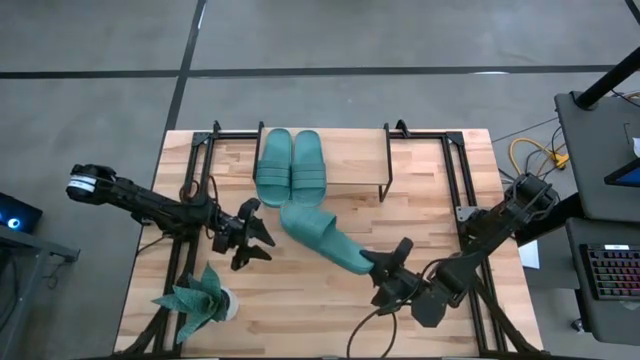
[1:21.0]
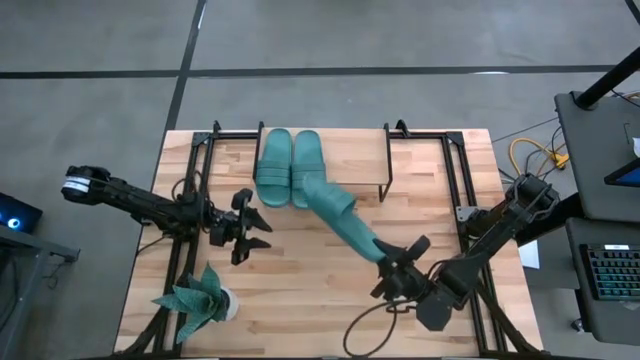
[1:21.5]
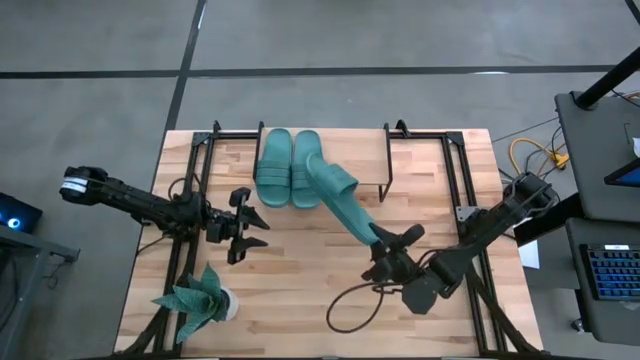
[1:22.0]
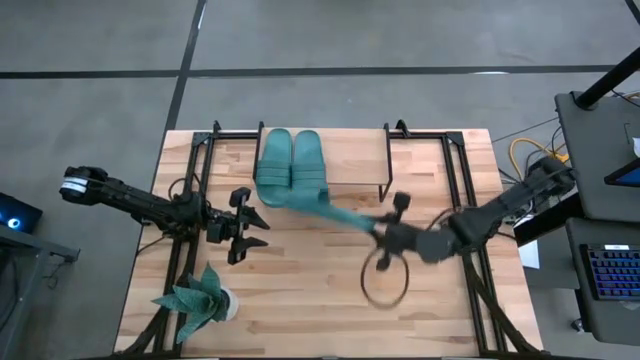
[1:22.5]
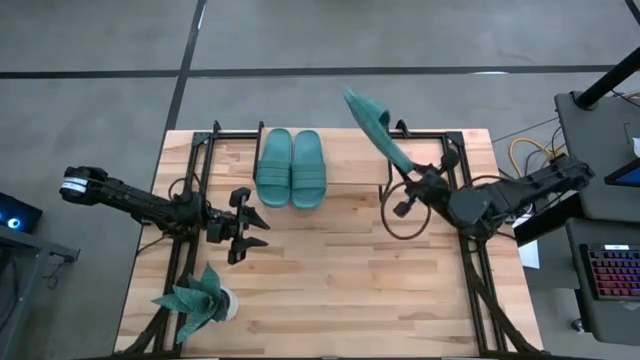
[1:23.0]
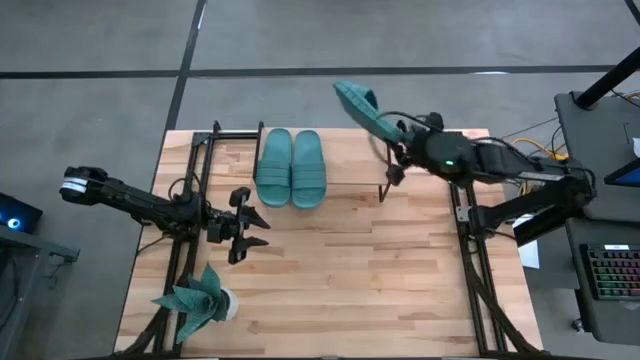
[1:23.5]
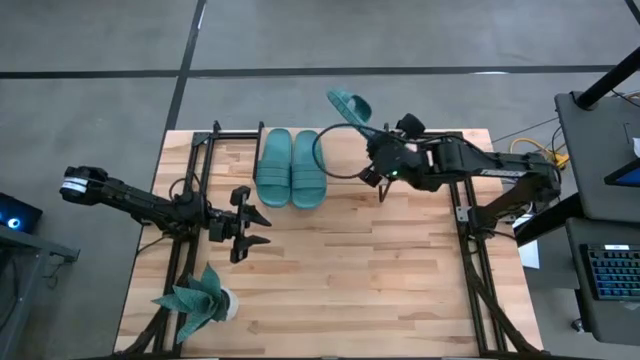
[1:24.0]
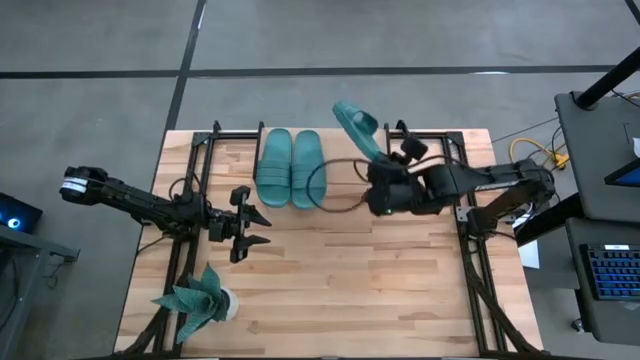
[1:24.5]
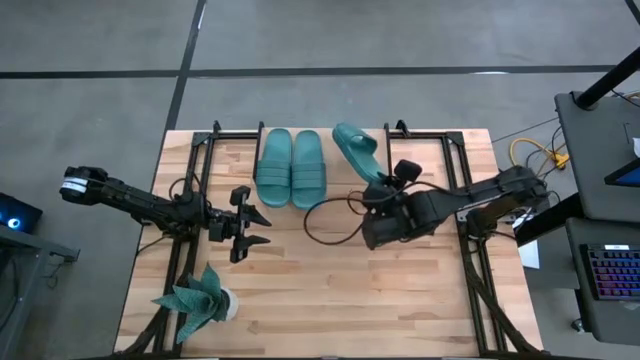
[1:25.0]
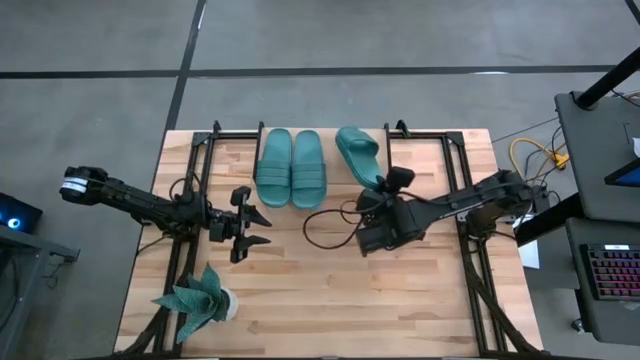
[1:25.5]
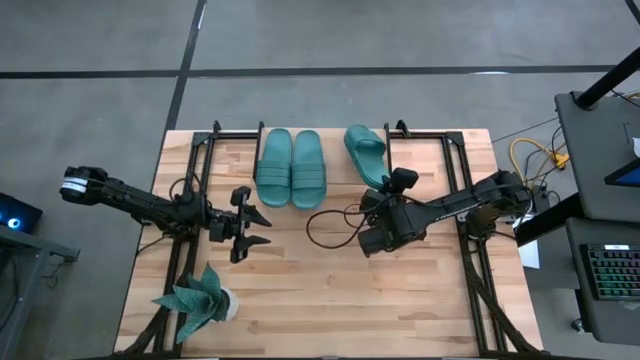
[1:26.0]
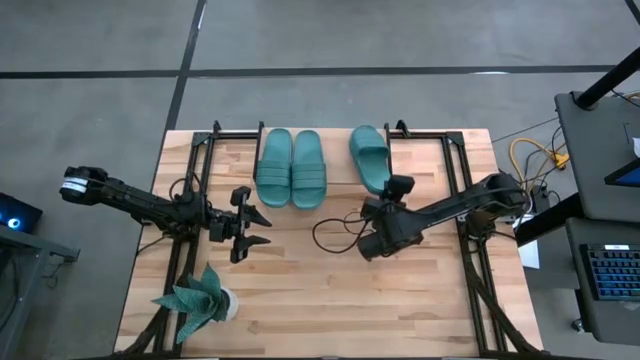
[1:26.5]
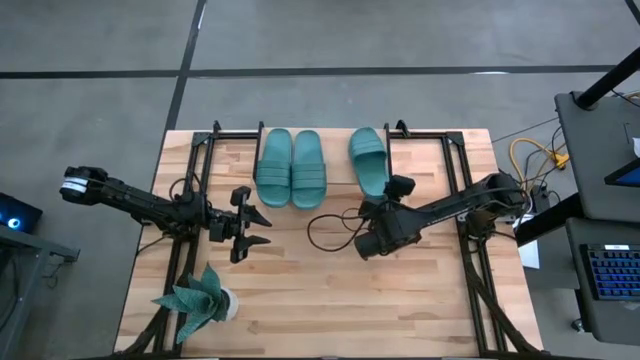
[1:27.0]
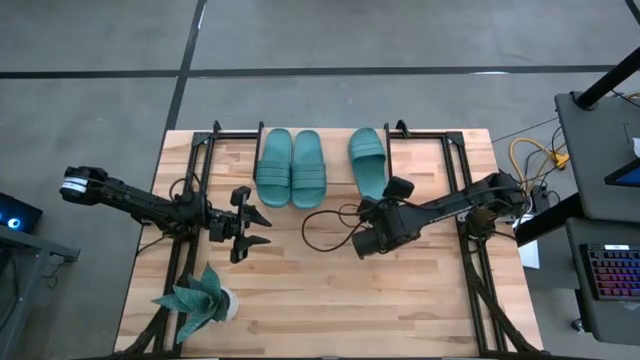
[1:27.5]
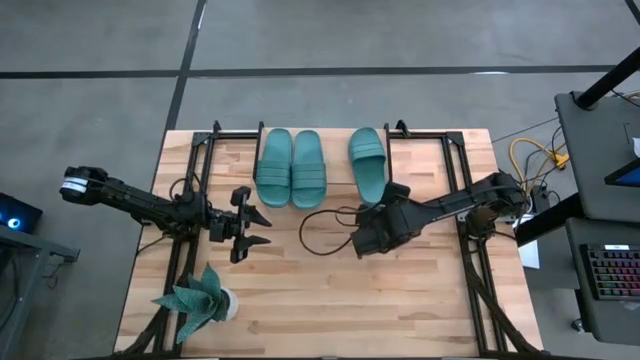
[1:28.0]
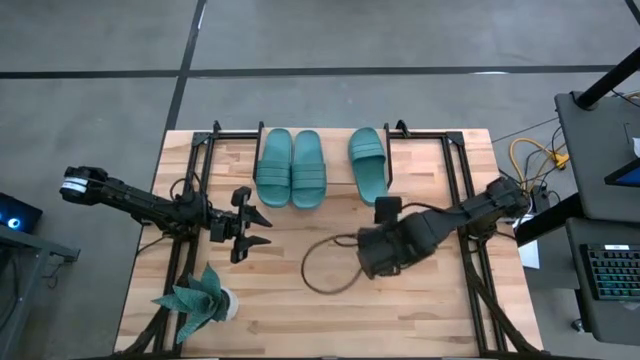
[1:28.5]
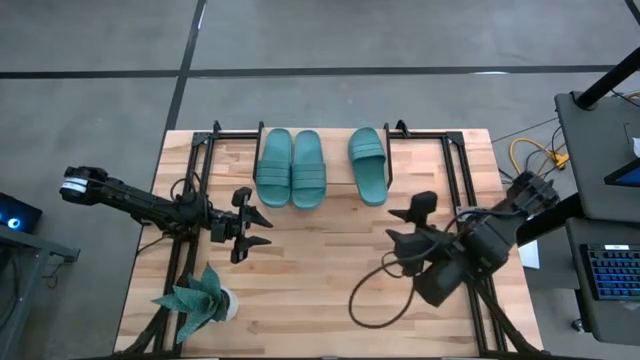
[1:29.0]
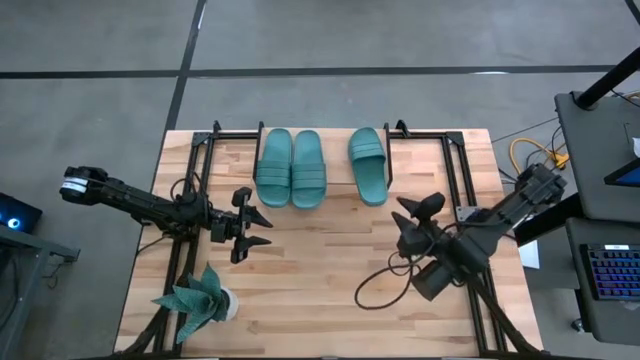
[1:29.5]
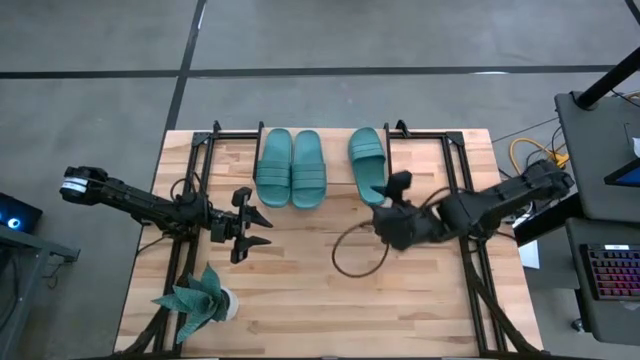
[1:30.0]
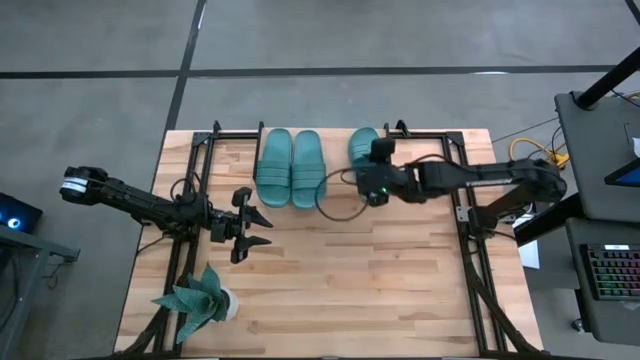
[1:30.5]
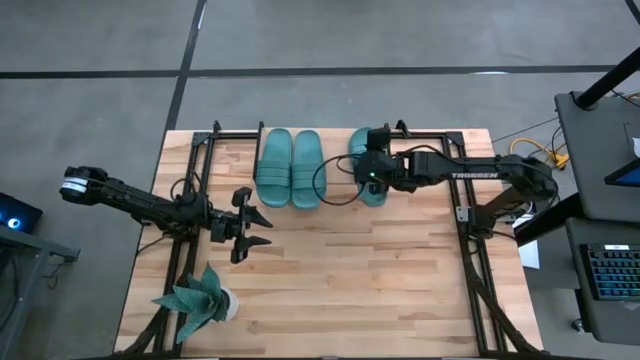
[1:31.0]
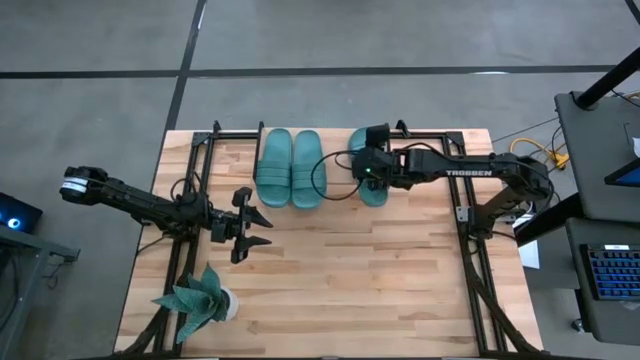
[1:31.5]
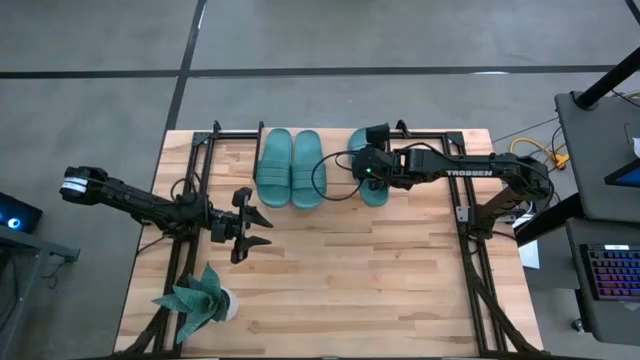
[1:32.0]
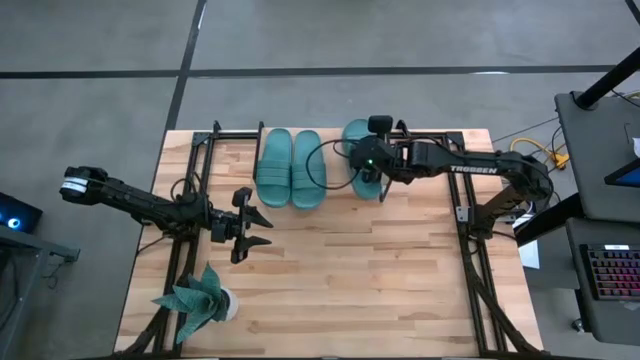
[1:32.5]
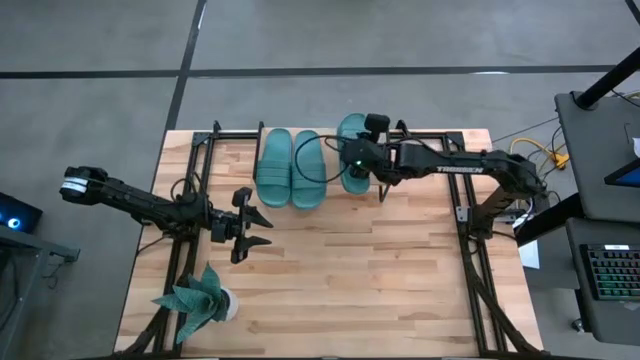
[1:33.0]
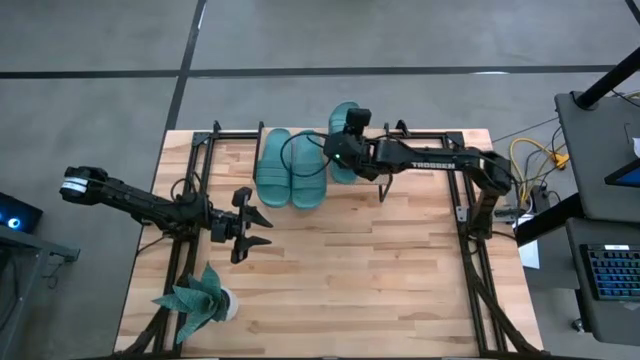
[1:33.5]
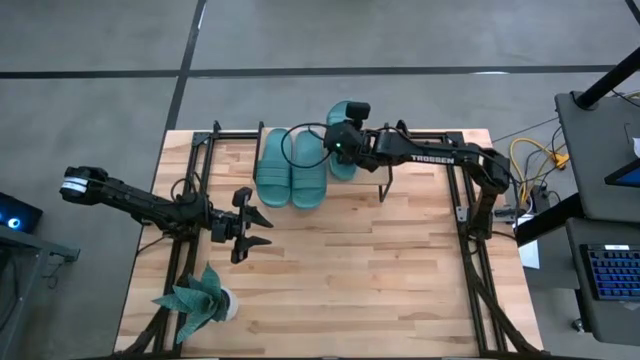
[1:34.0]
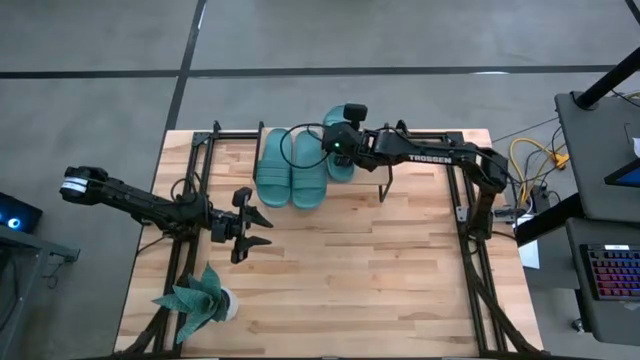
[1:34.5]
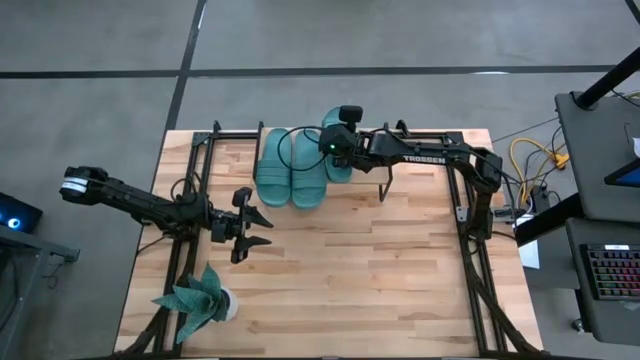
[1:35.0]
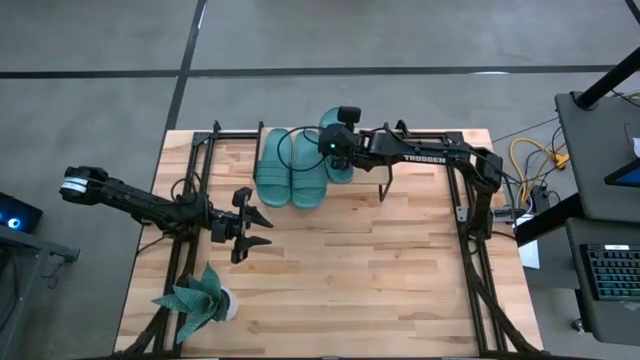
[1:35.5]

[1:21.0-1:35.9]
Task: Pick and place slides into the shelf
Put the blue slipper on the shelf

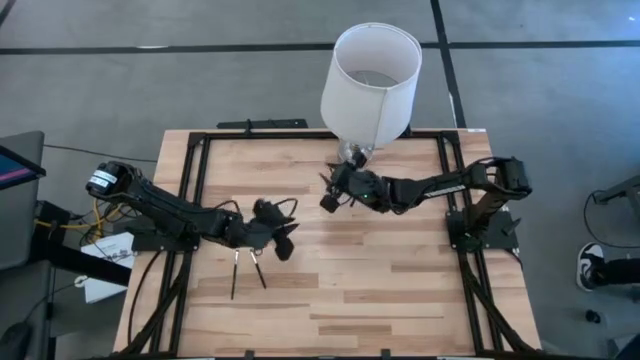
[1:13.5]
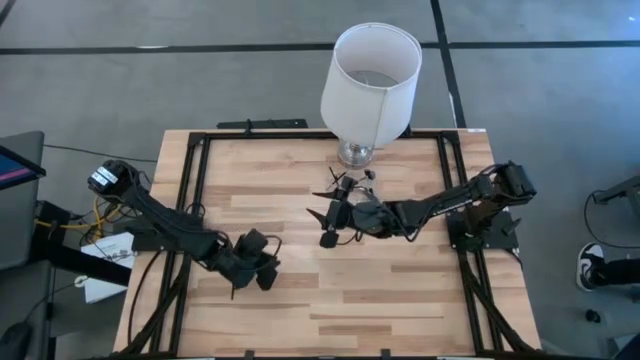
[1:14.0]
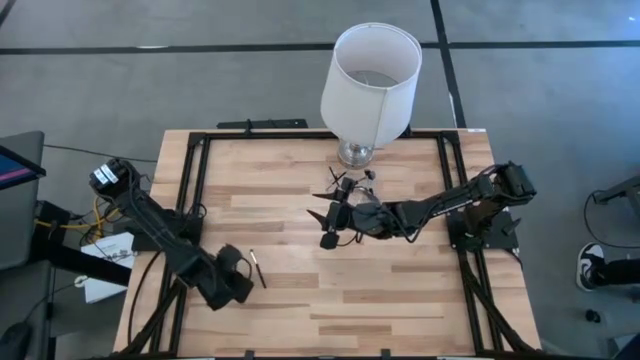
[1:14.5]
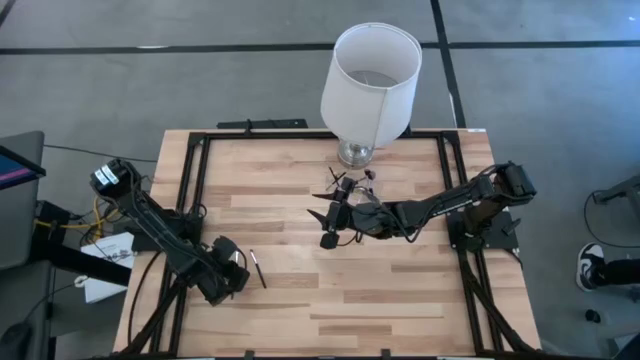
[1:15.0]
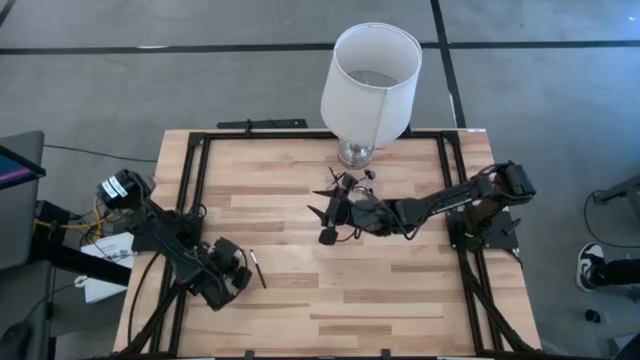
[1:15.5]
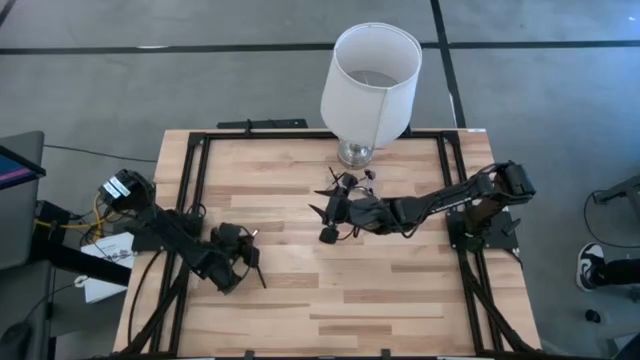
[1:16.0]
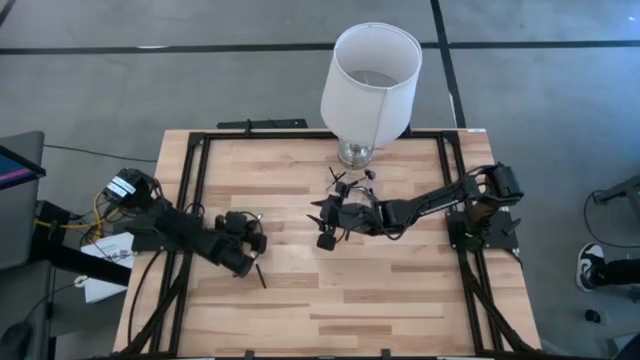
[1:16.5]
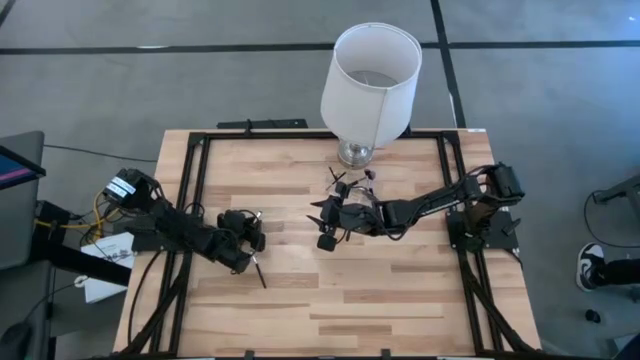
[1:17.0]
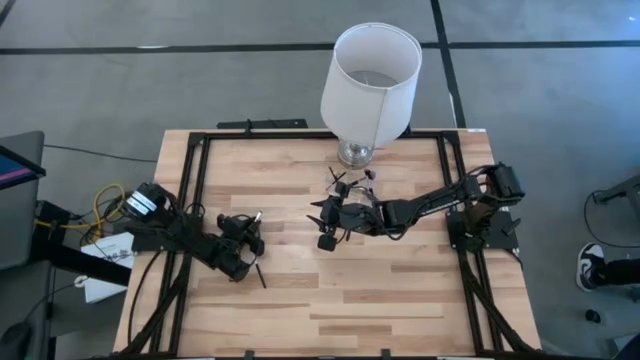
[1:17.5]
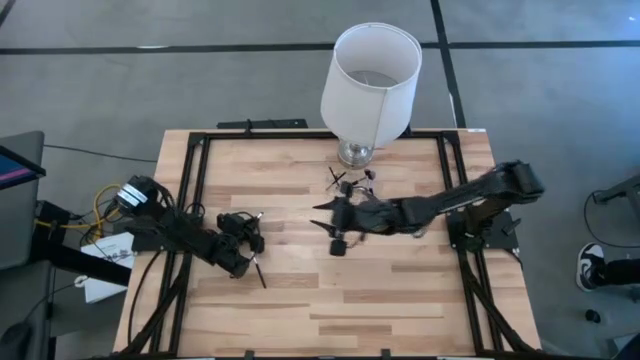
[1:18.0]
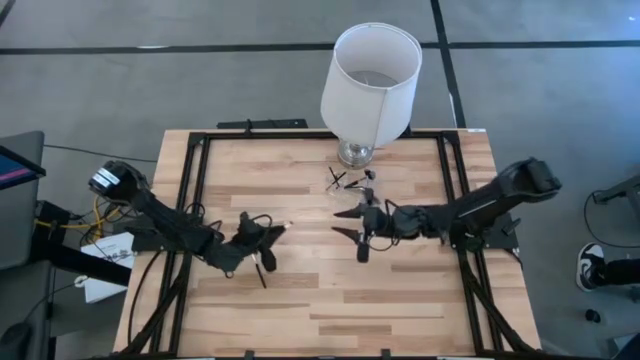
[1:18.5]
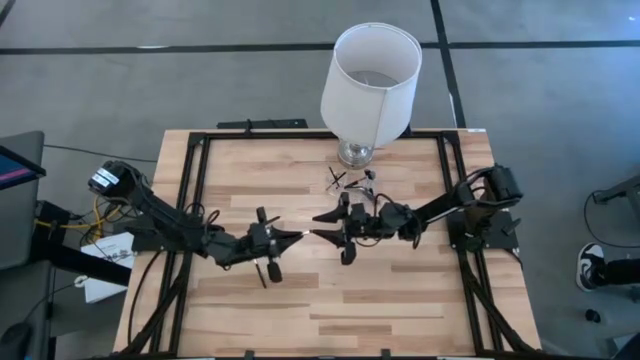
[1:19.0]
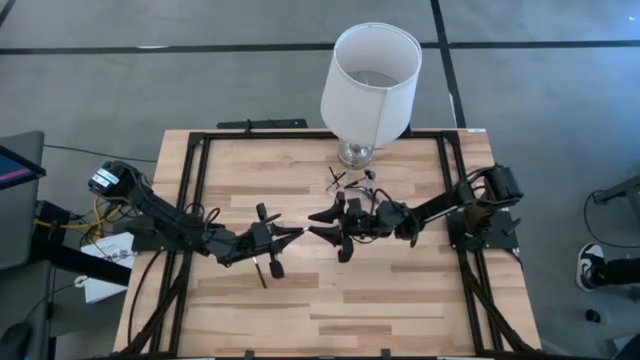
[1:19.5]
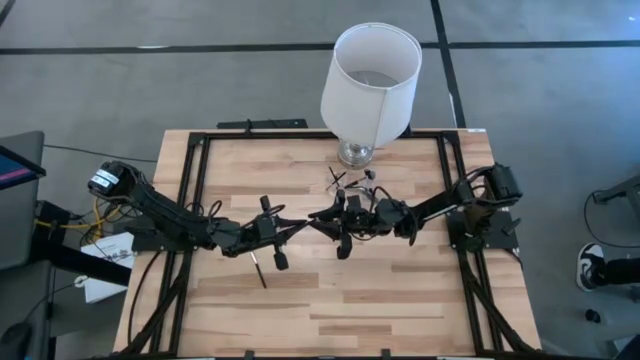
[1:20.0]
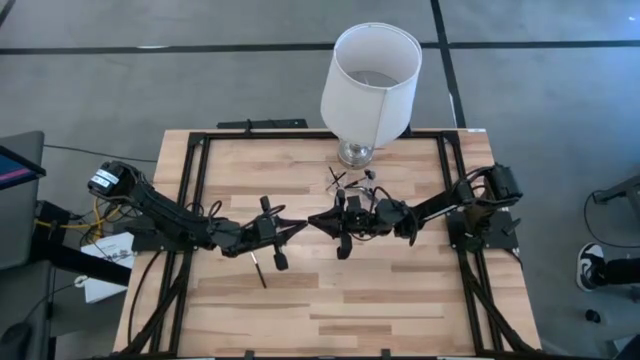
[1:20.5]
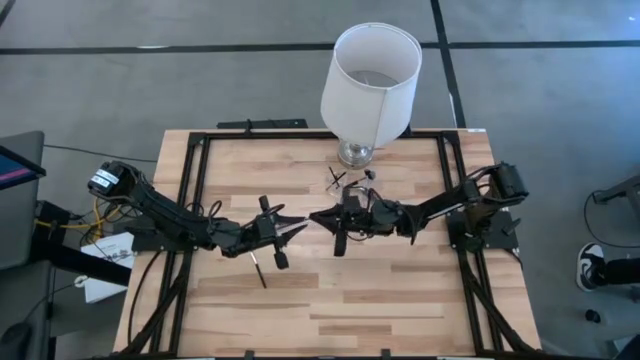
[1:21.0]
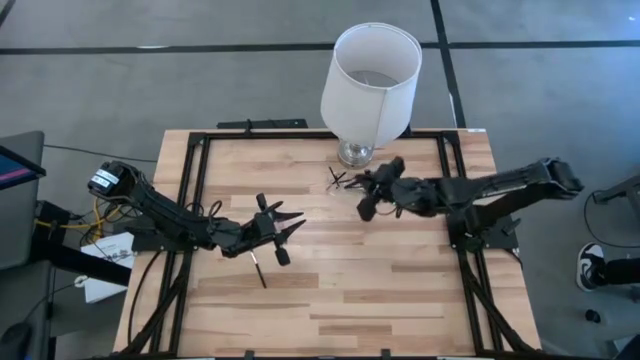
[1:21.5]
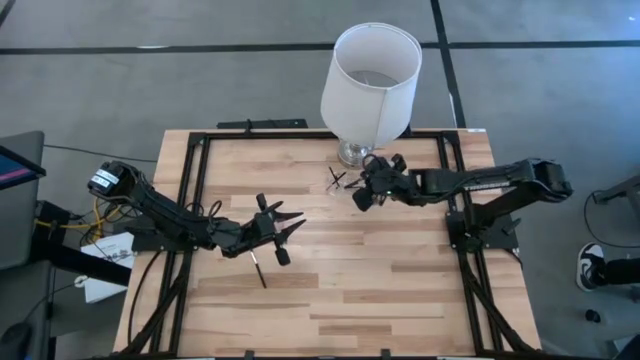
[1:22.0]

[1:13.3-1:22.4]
Task: Put items in baskets/containers
Put the black eyeshadow brush into the transparent organizer
